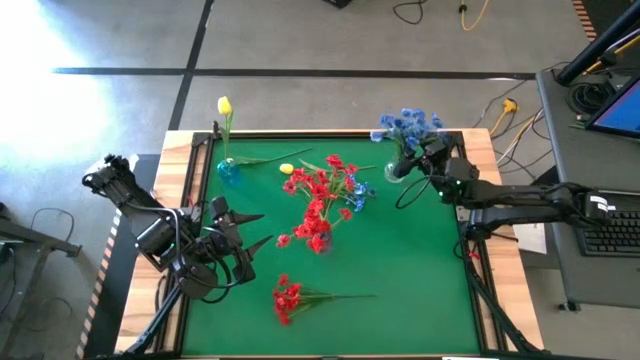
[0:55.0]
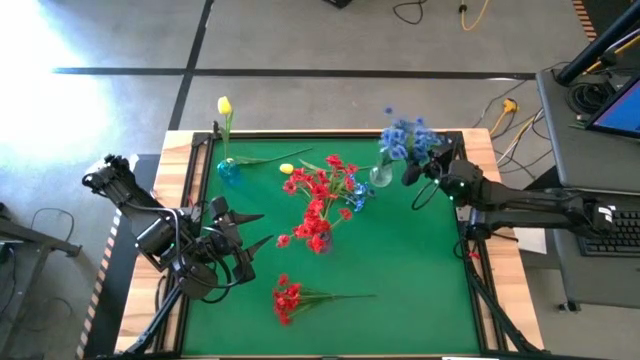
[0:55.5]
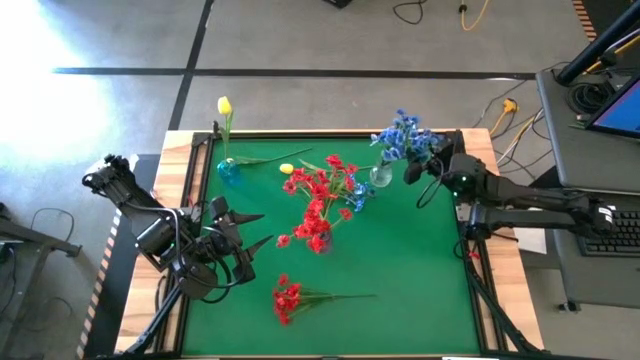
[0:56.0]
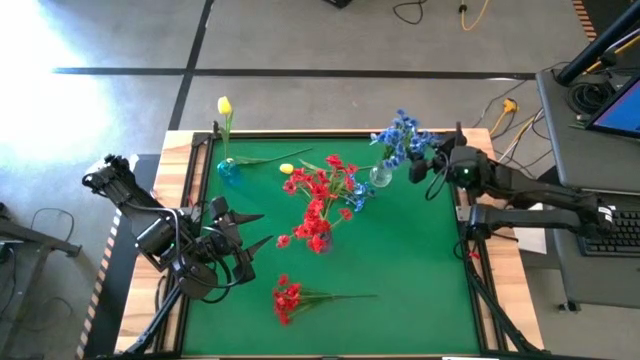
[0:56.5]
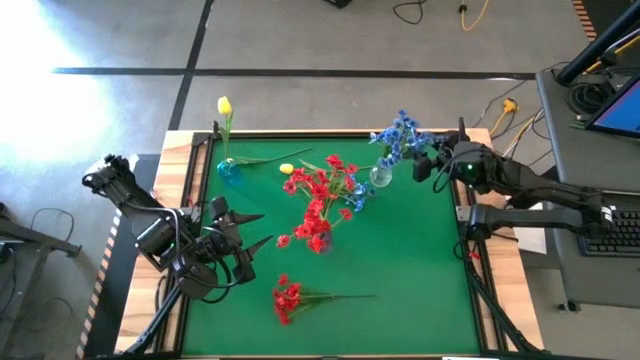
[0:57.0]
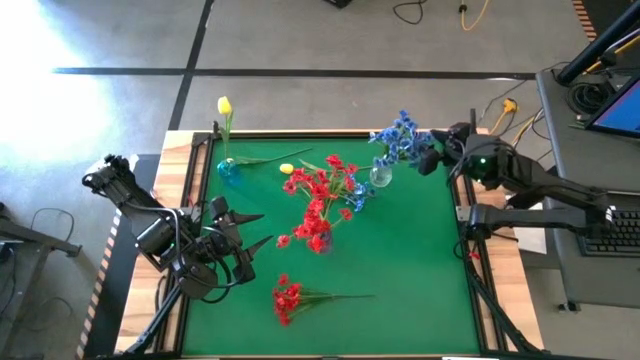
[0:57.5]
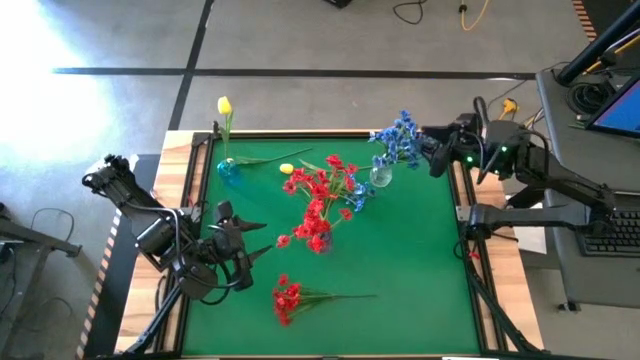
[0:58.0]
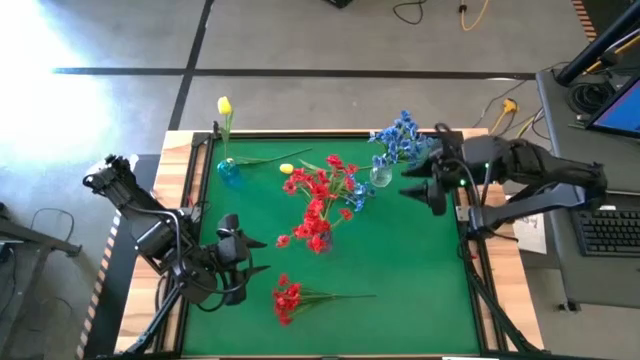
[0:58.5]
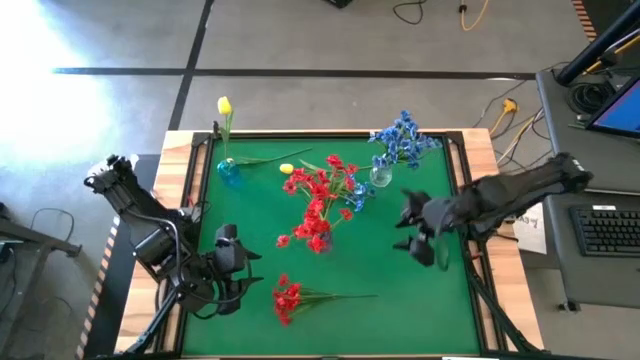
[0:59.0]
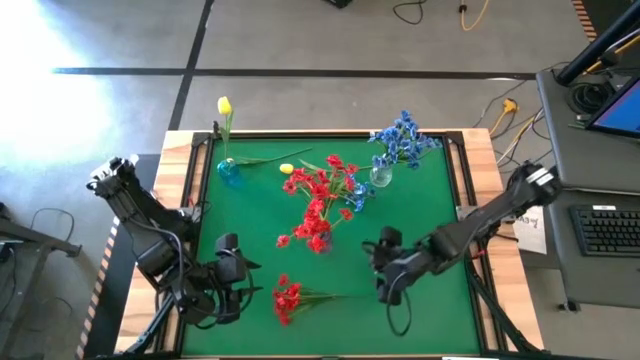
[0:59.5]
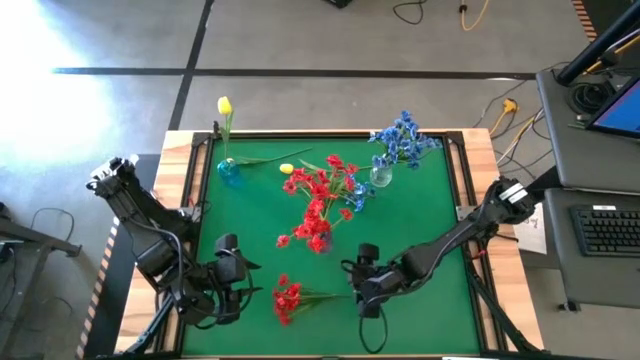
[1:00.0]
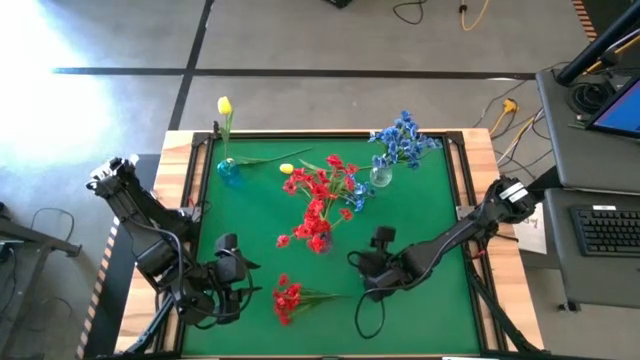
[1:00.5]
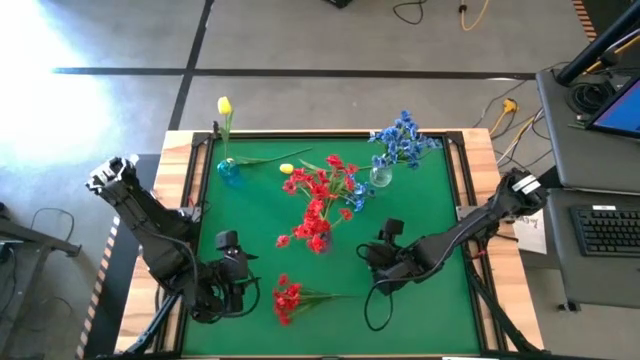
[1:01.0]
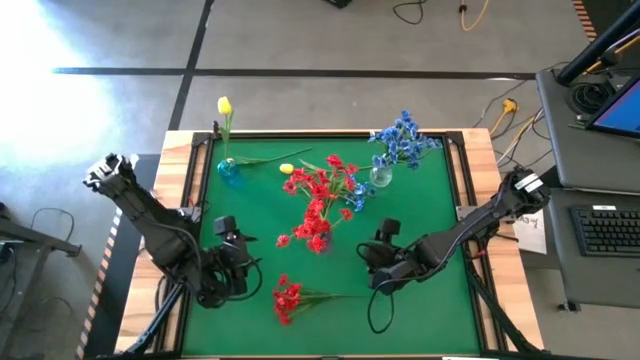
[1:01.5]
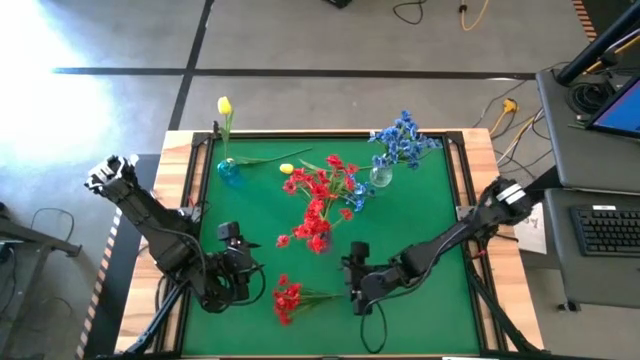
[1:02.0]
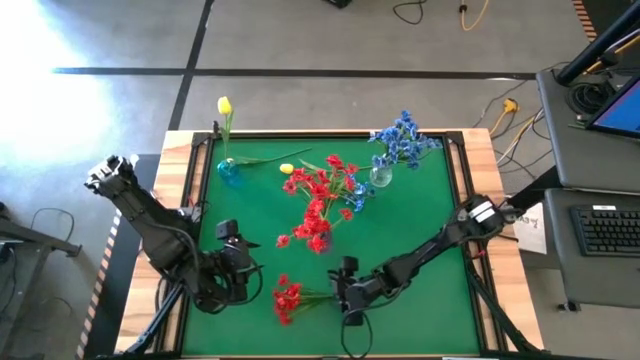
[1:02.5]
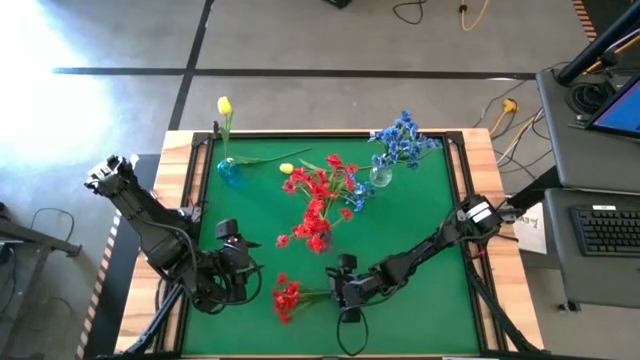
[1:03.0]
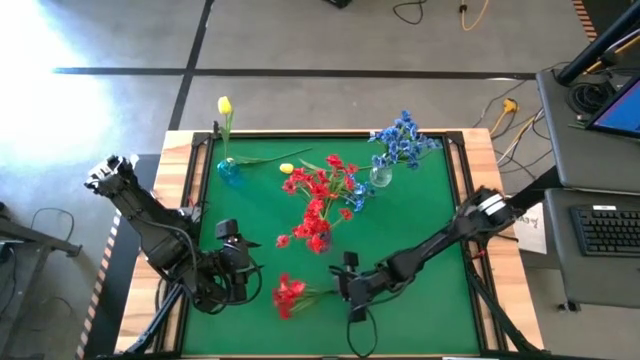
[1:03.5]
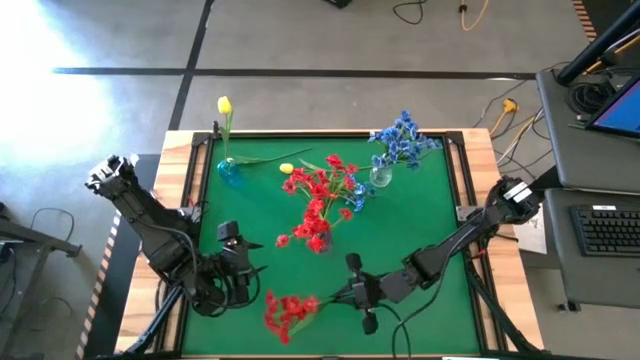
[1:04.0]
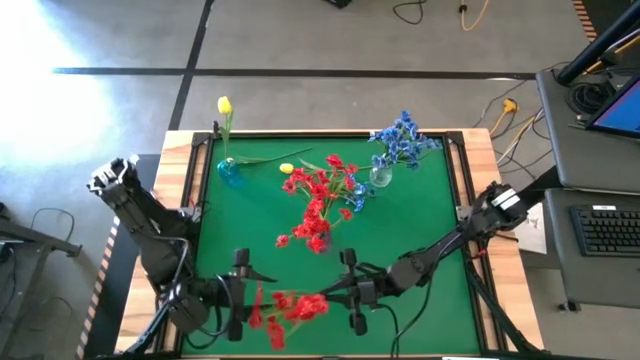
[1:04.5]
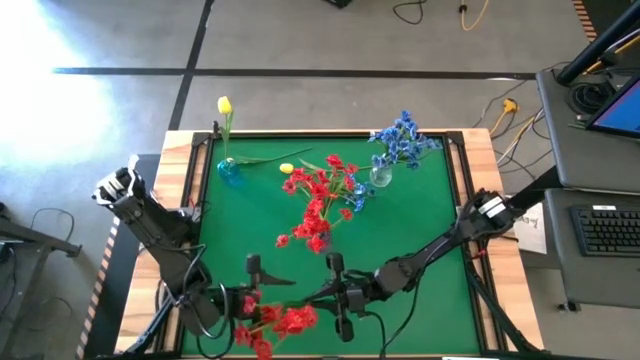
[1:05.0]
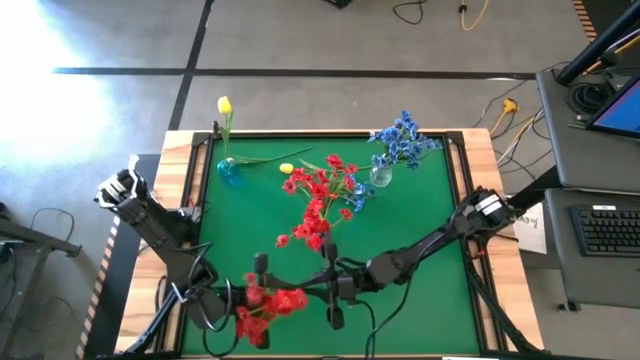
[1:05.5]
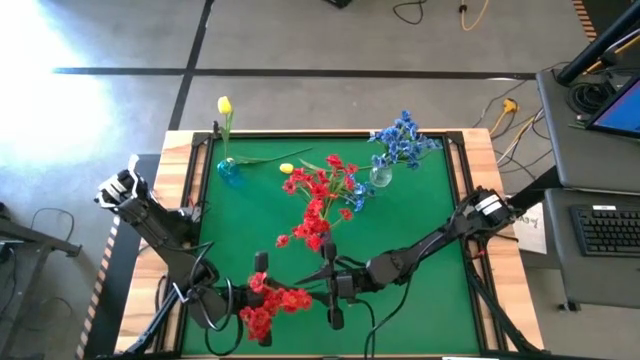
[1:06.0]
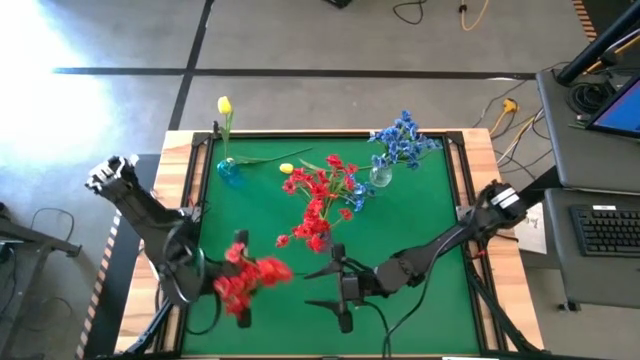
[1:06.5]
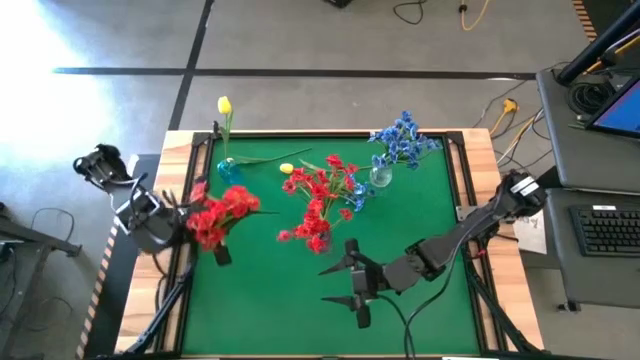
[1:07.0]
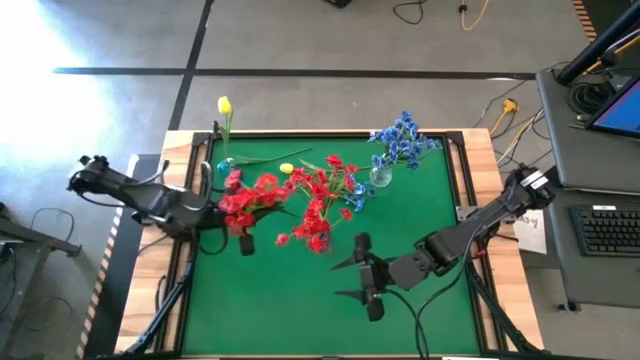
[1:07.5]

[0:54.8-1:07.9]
Task: Sort flowers into vase by color
Put the red flowers into the purple vase

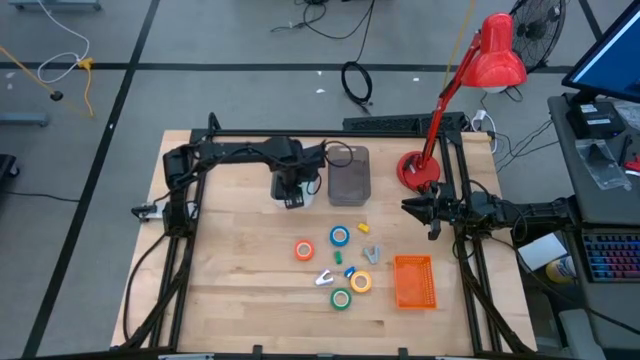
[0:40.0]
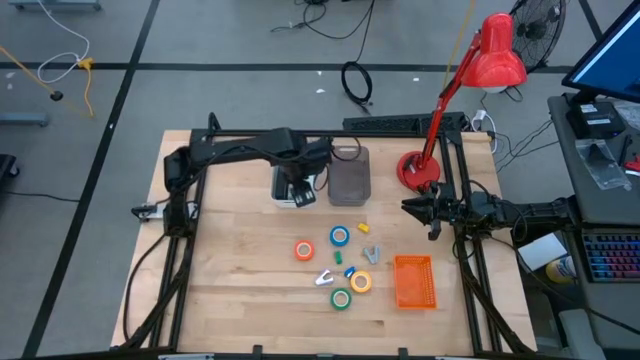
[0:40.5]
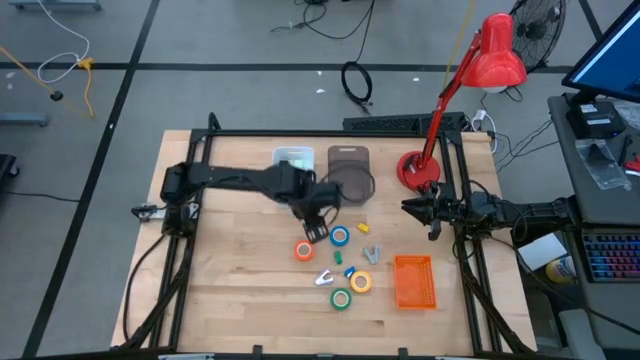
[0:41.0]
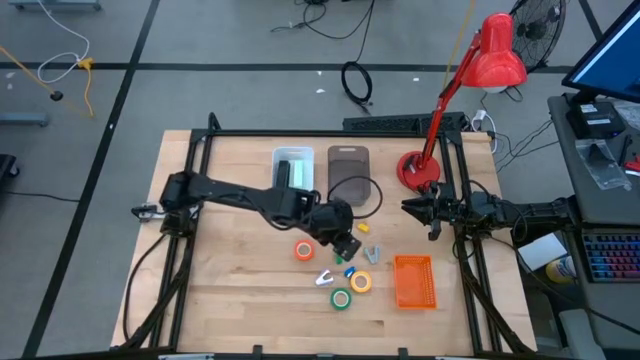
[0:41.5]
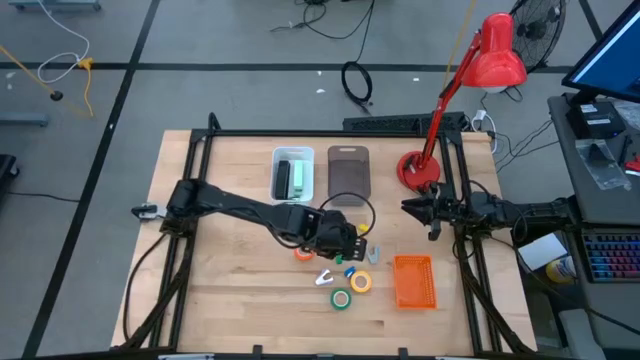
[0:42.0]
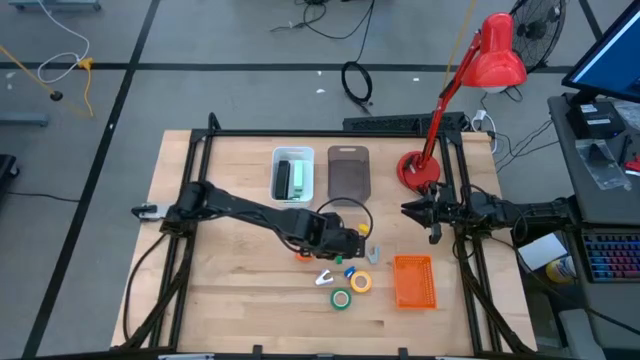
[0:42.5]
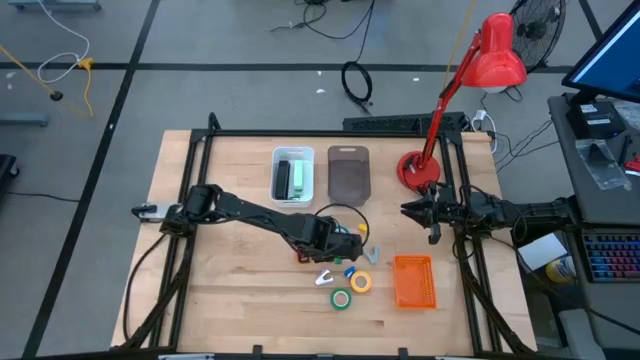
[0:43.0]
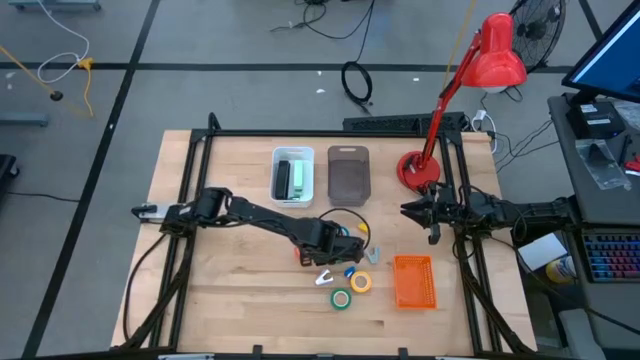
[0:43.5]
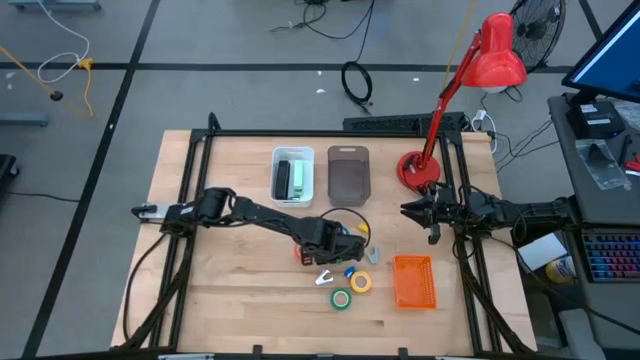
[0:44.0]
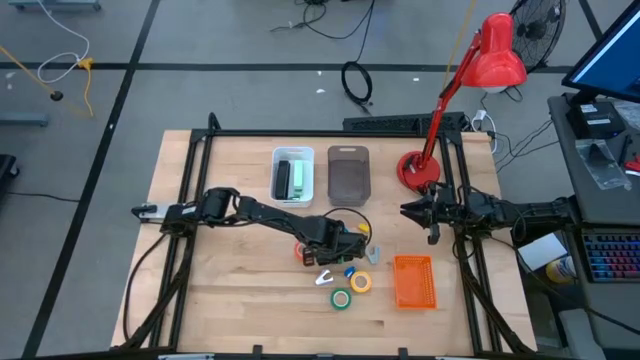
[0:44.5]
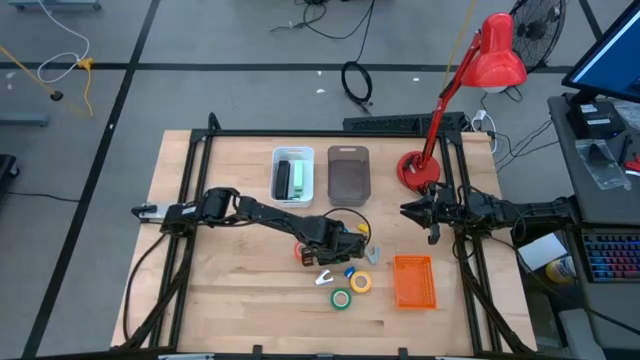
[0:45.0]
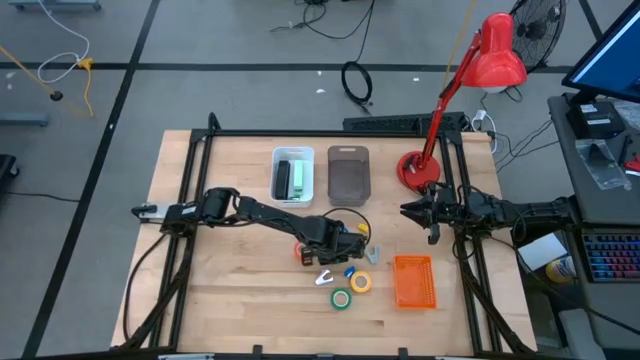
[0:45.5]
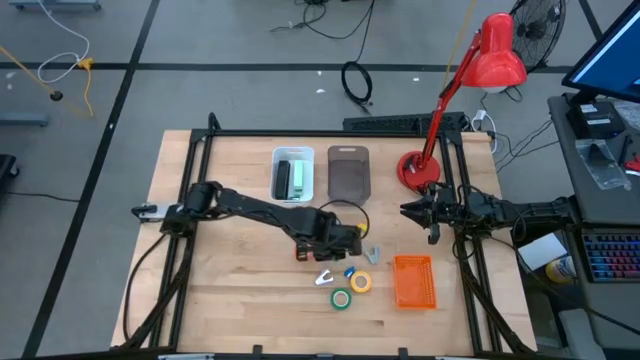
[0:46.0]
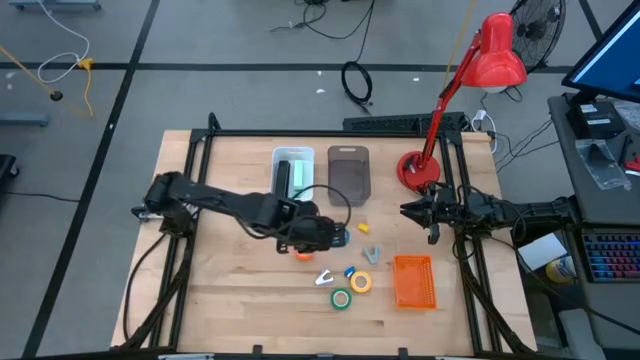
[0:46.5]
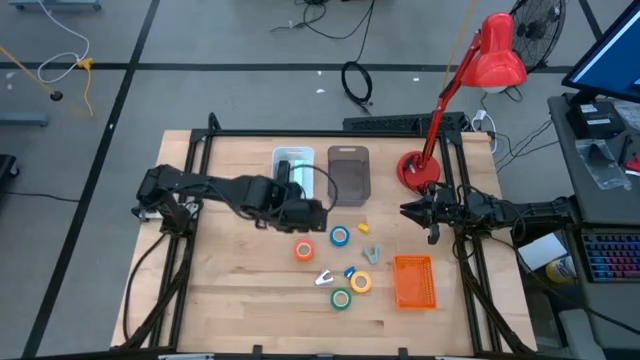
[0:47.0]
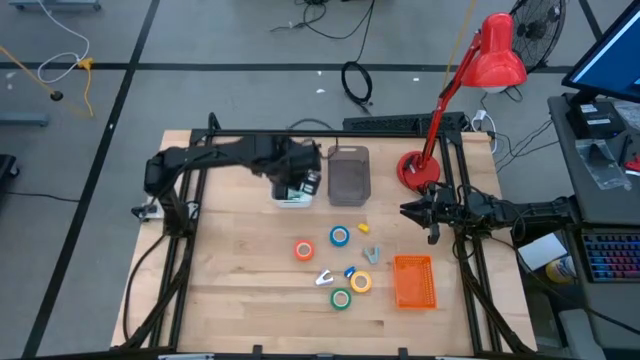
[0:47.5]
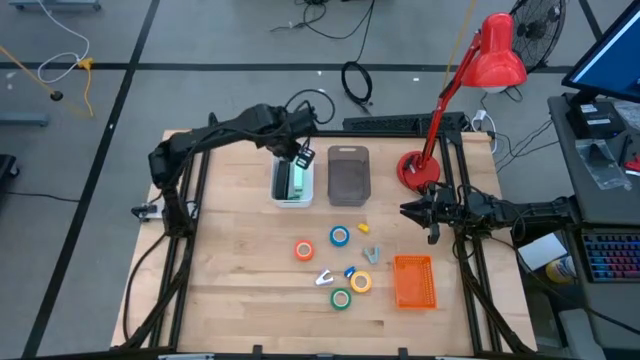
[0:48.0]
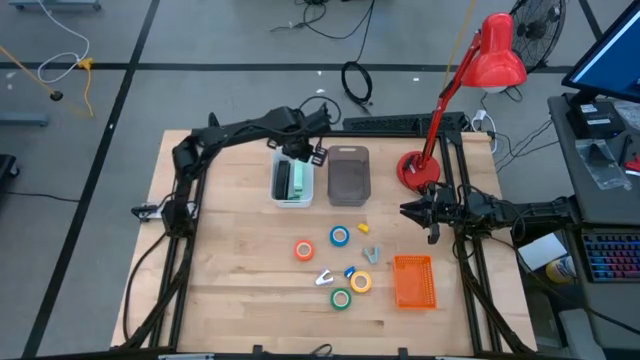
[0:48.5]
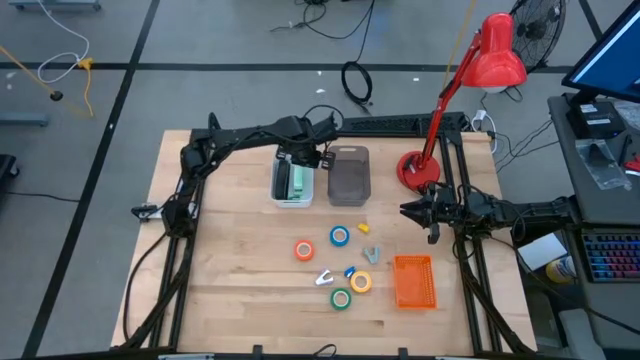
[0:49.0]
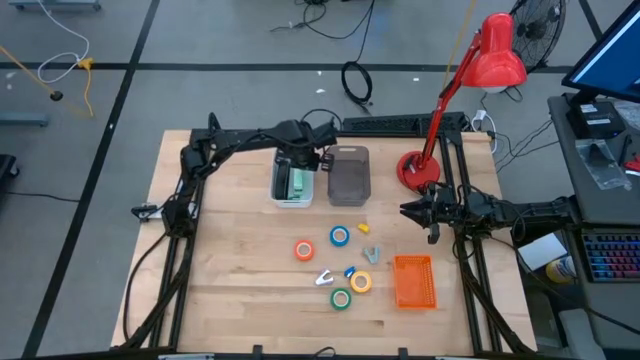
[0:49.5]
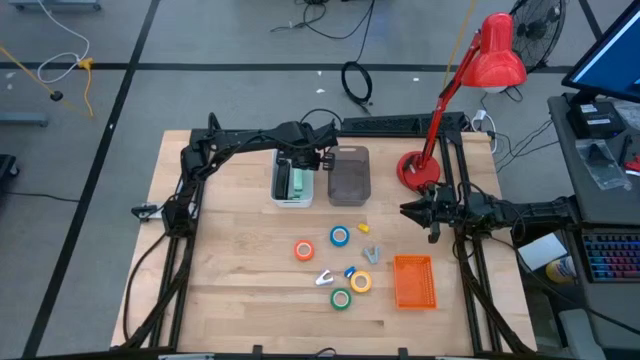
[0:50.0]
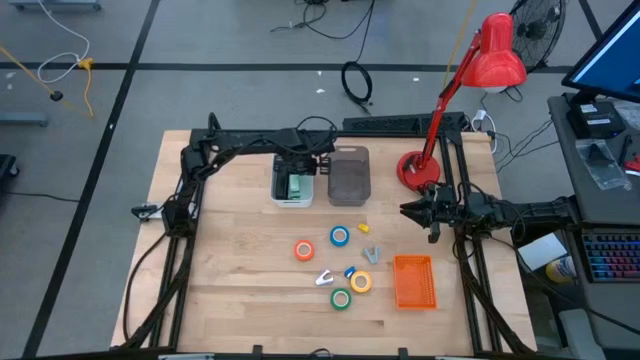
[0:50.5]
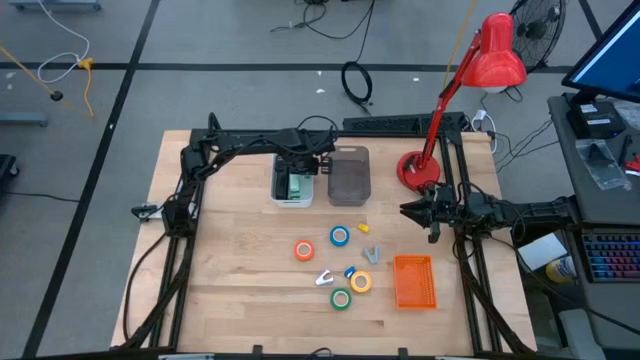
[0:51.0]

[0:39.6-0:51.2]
Task: Pick and place Stapler, Stapler remover, tape
Put the green stapler into the white bin
